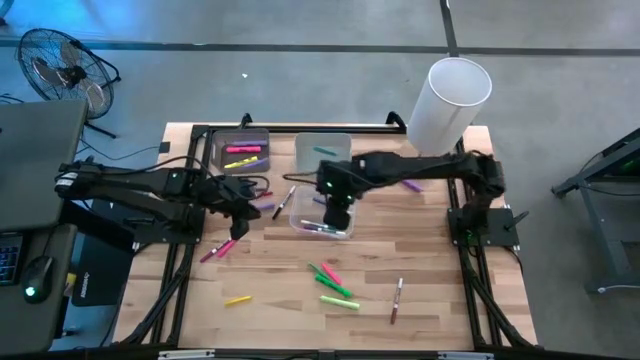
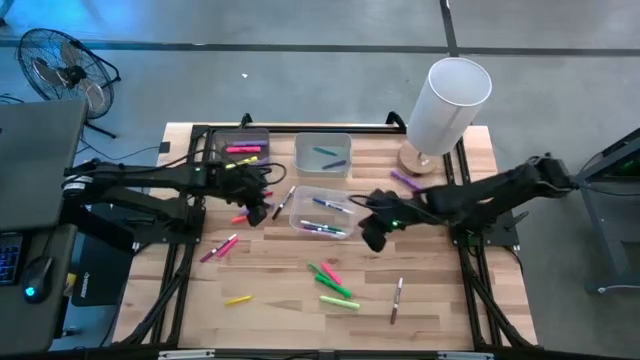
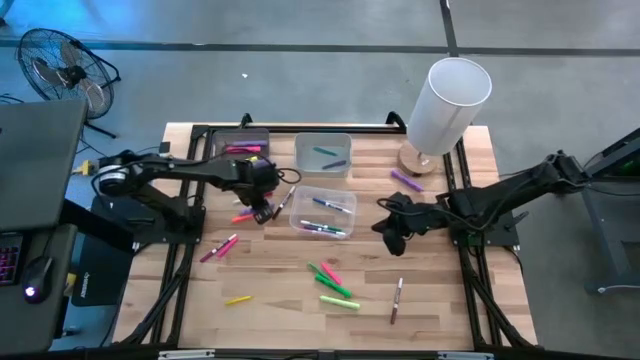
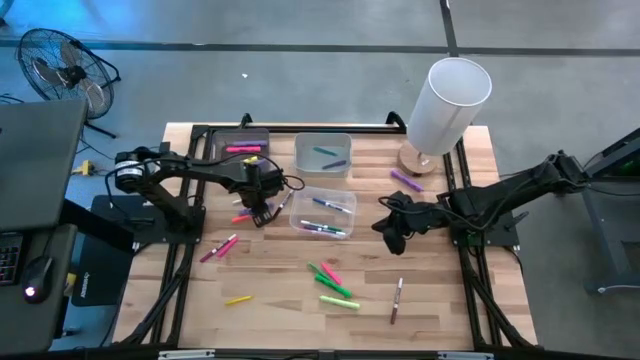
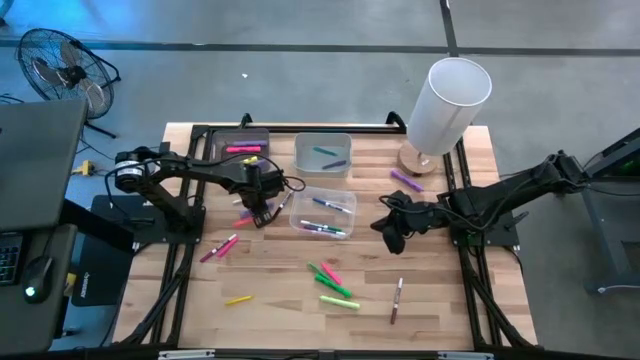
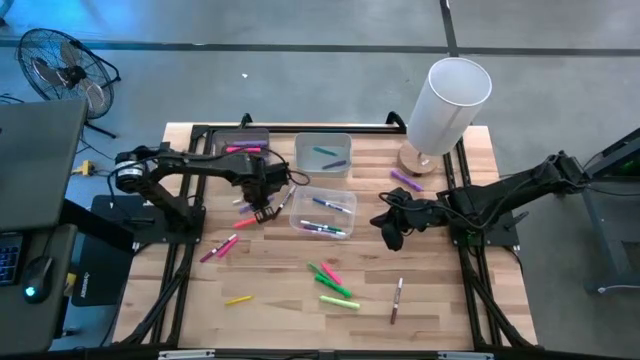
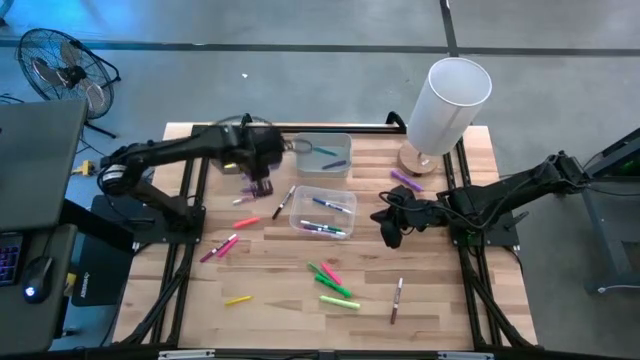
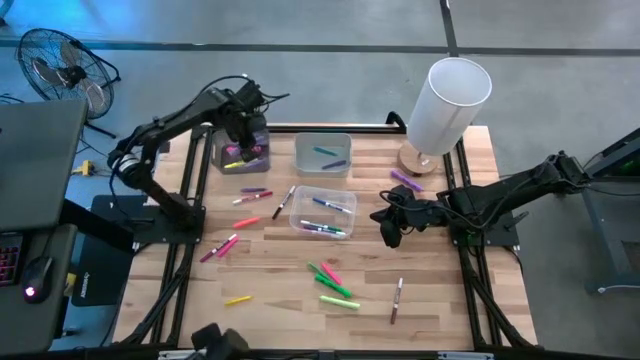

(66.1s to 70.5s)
Task: Pick & Place Markers
Put the violet highlighter into the black bin

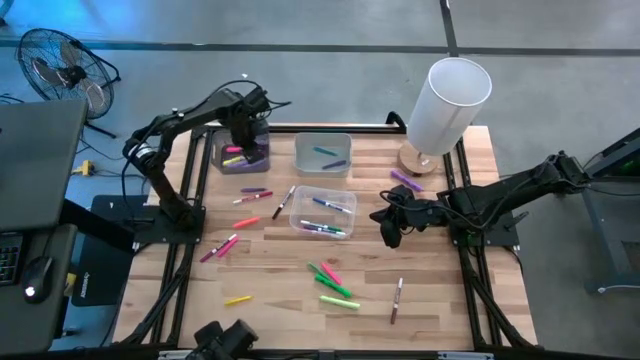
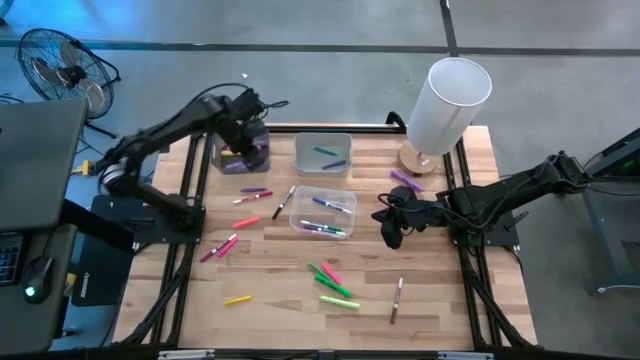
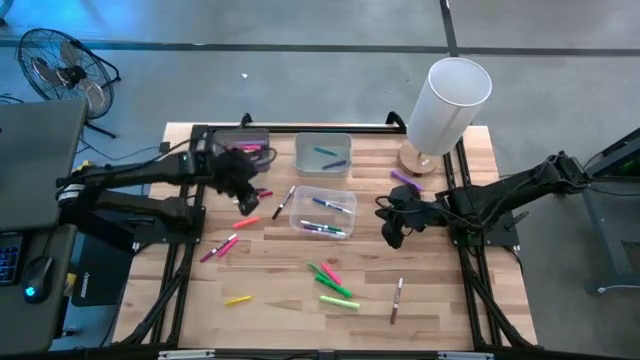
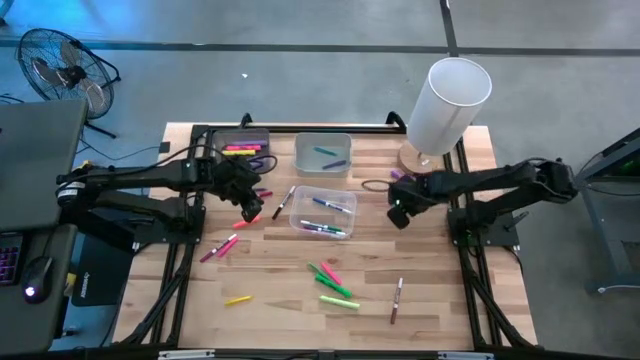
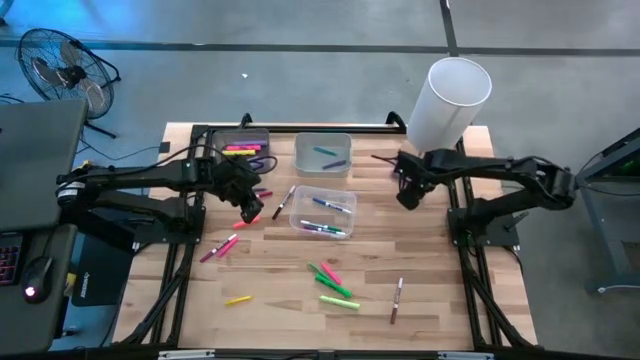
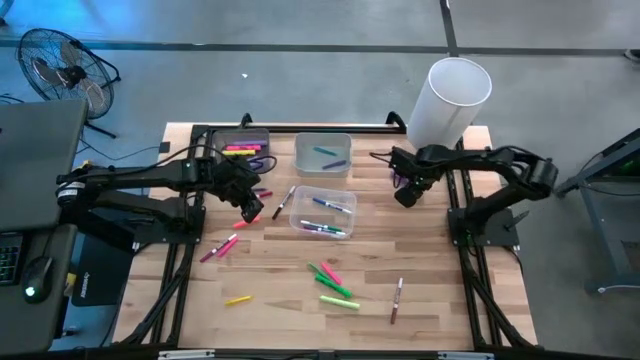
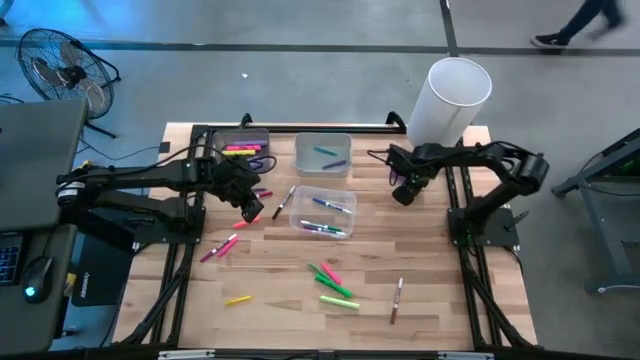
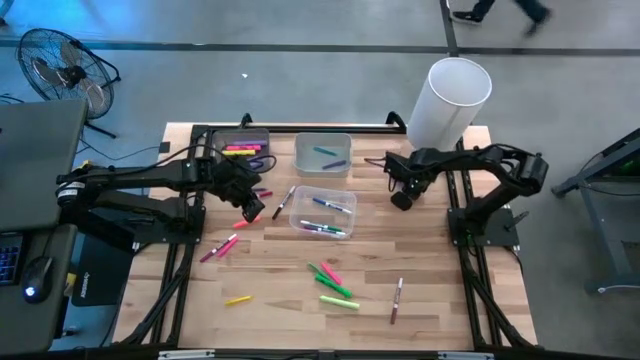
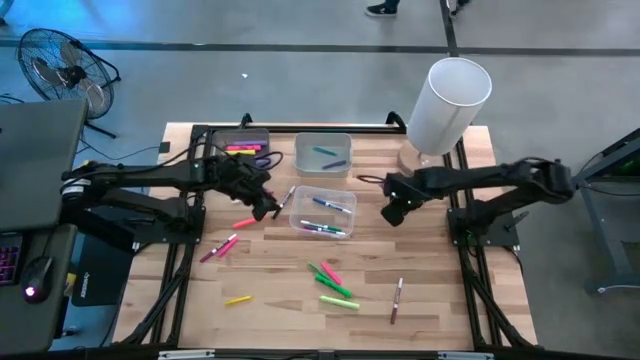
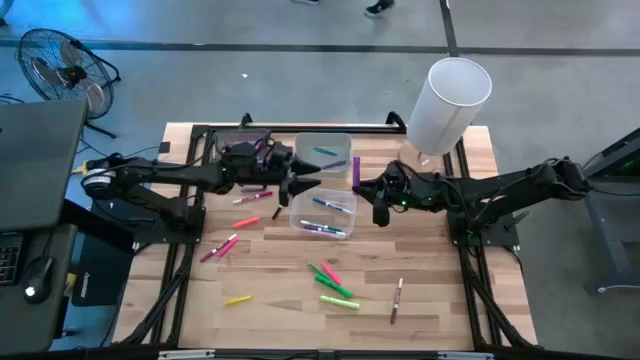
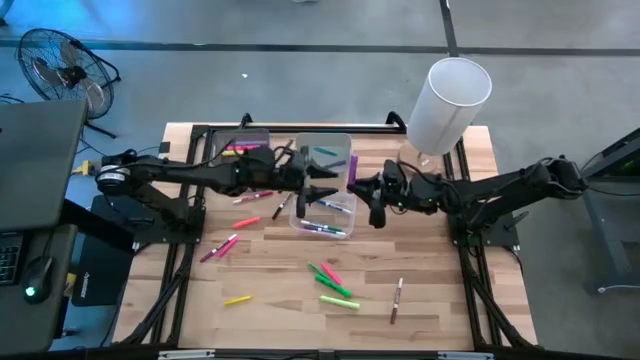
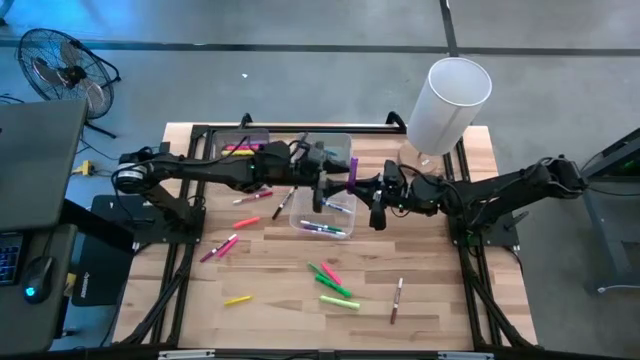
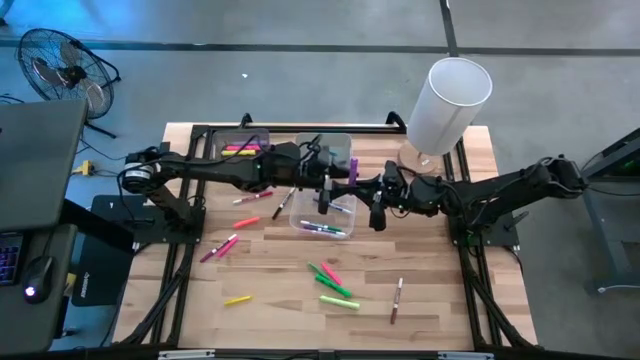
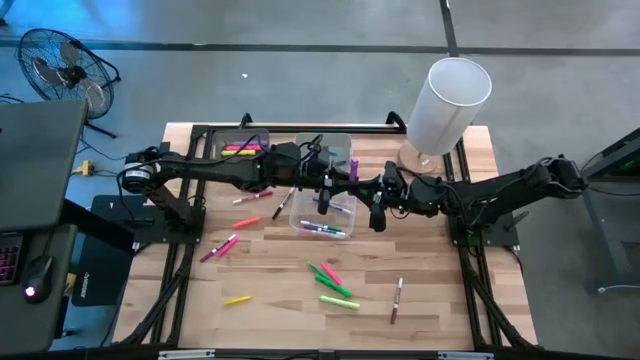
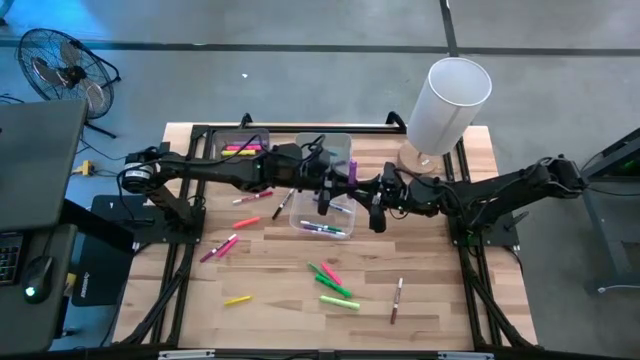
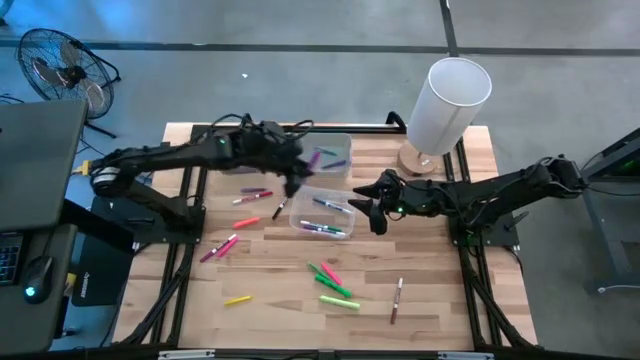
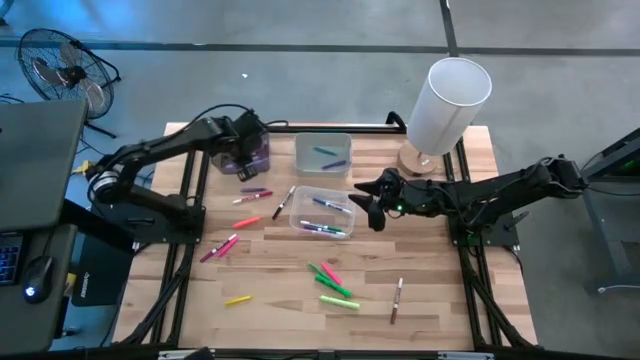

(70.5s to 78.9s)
Put the purple highlighter into the black bin

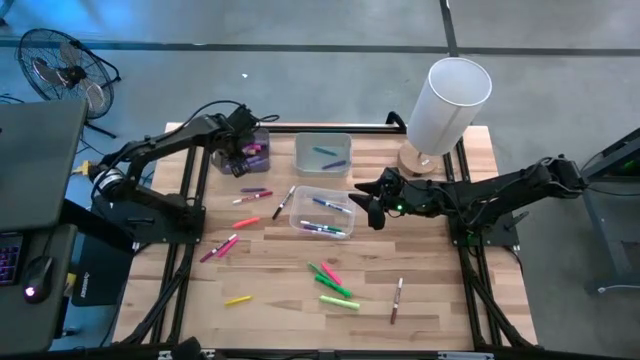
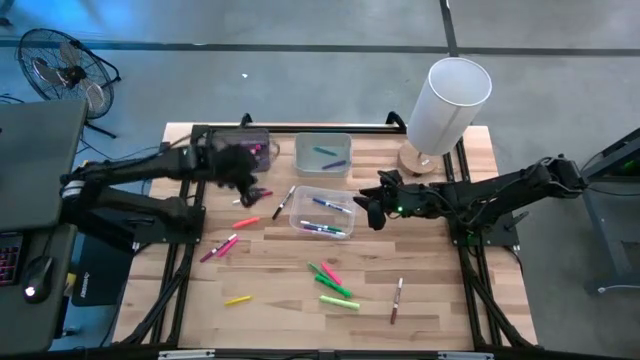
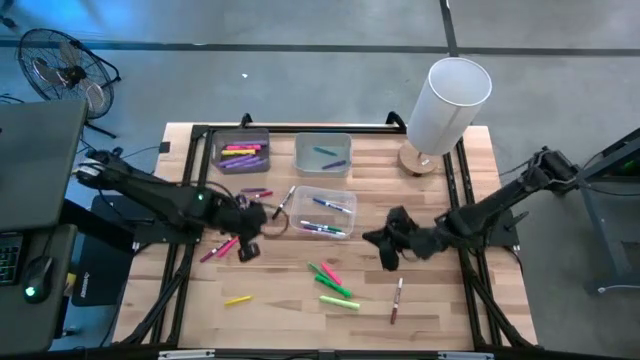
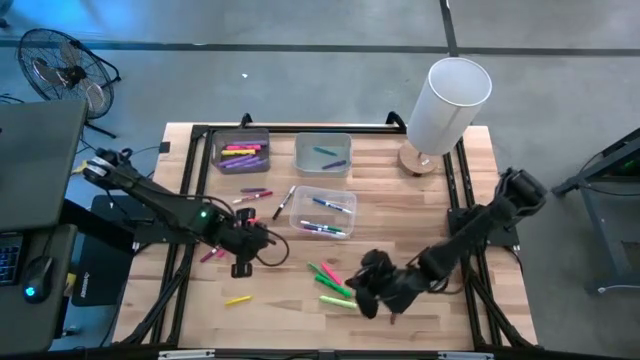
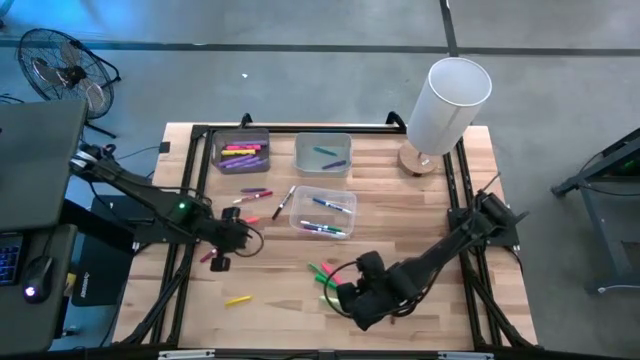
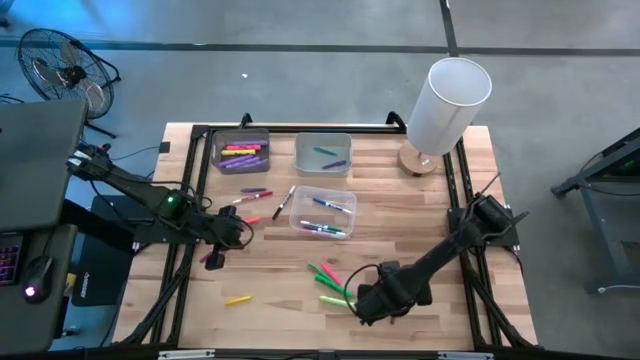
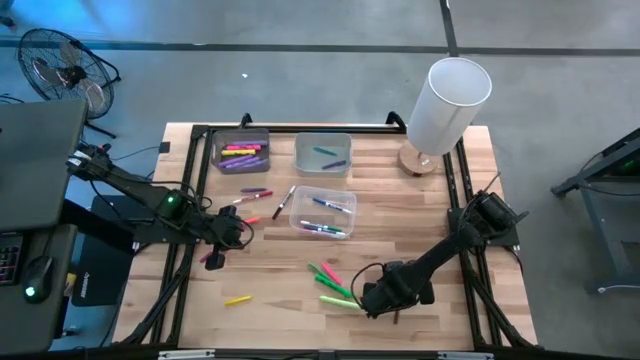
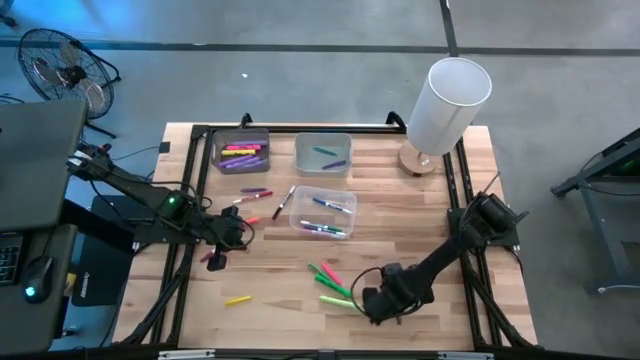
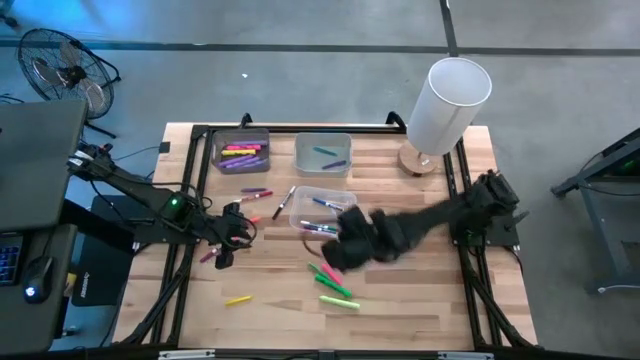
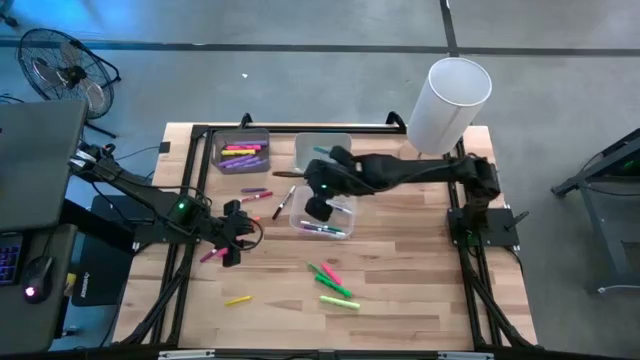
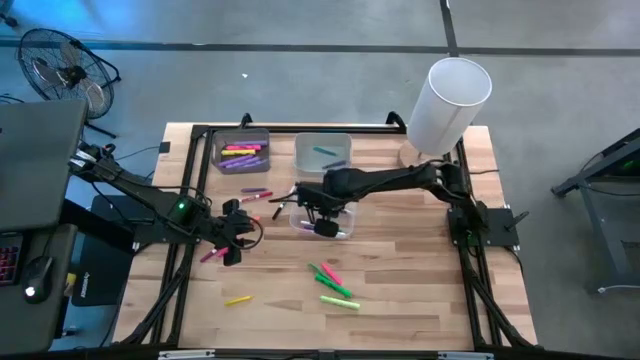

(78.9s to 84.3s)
Put the brown marker into the white bin

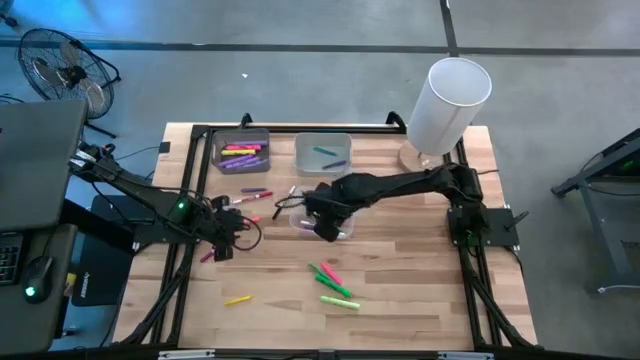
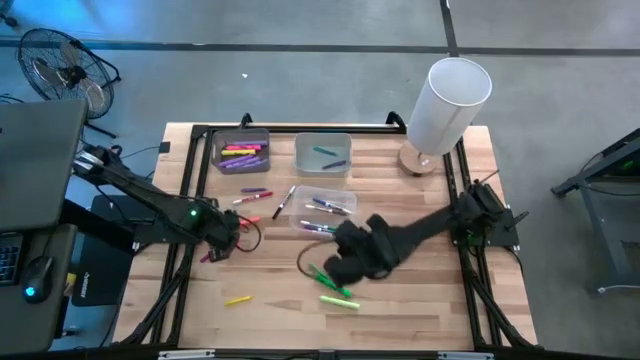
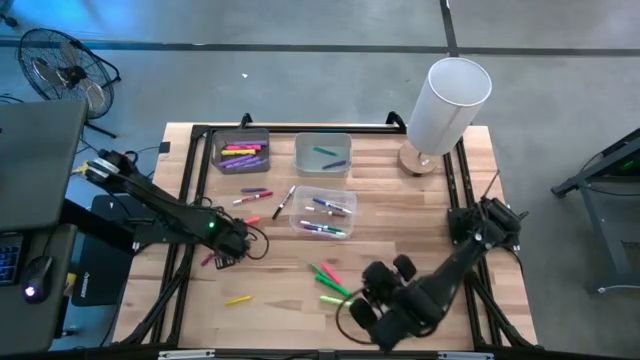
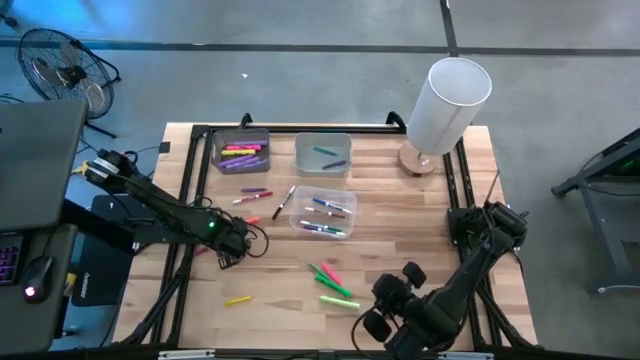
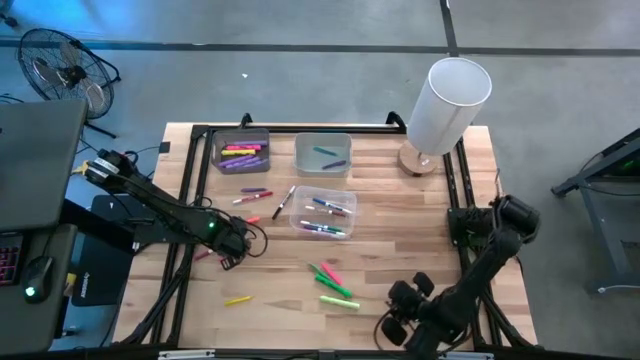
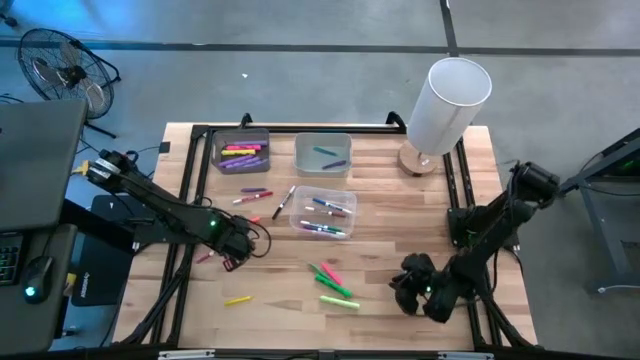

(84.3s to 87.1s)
Put the purple marker into the white bin
